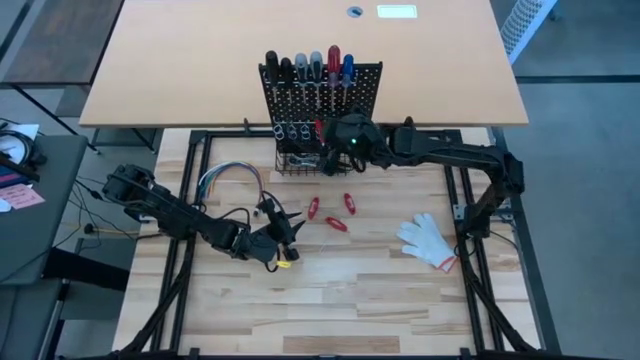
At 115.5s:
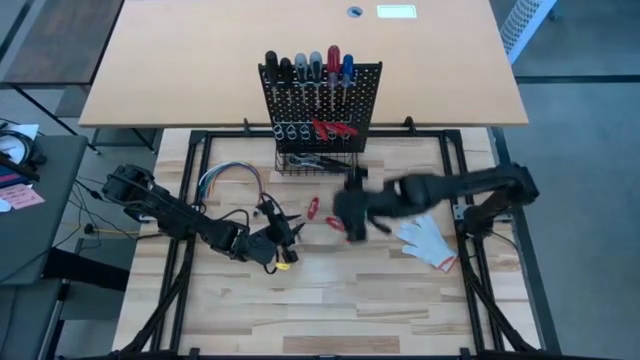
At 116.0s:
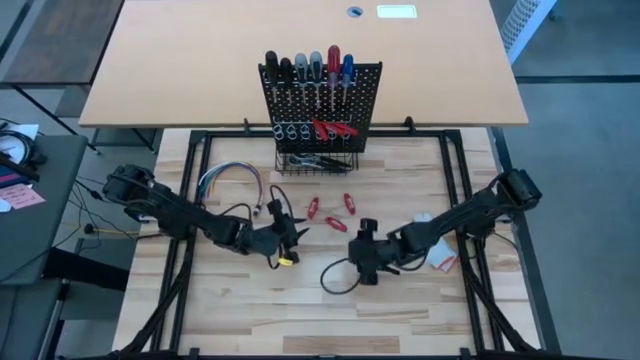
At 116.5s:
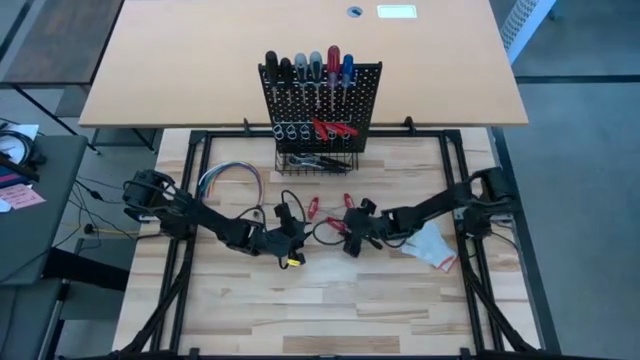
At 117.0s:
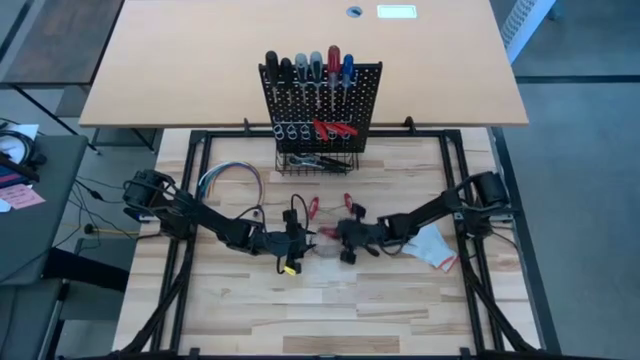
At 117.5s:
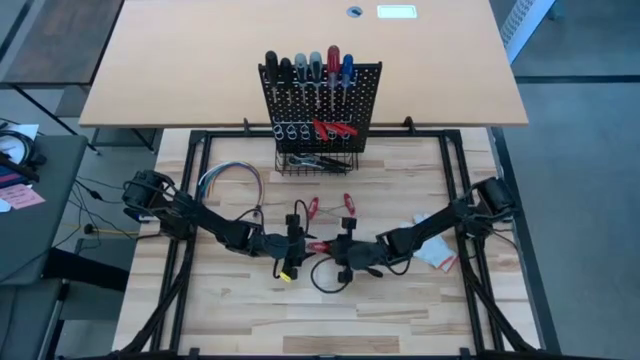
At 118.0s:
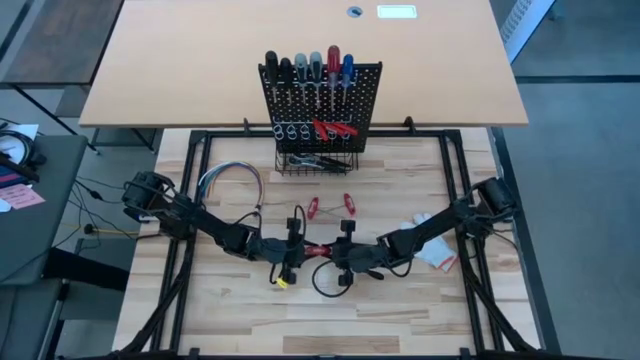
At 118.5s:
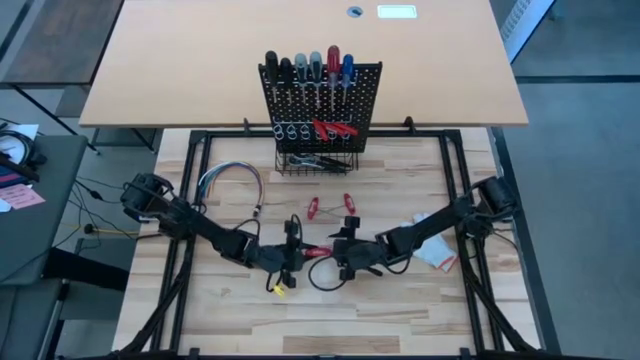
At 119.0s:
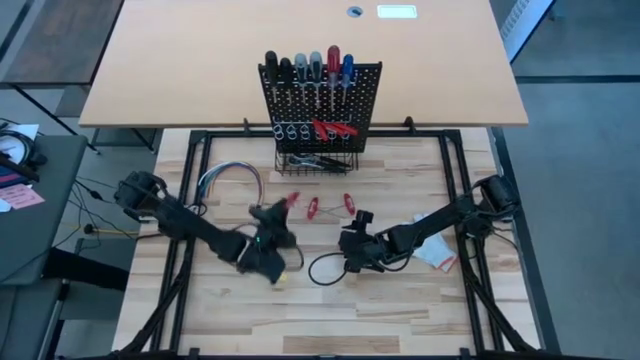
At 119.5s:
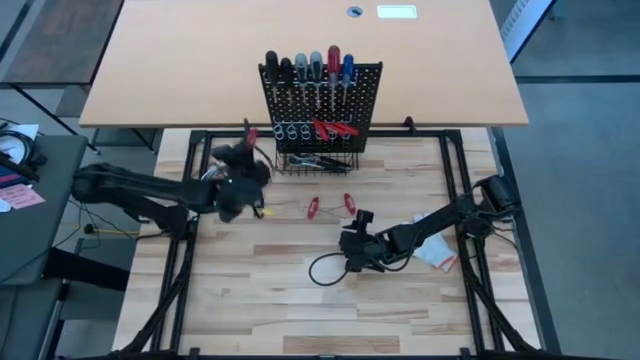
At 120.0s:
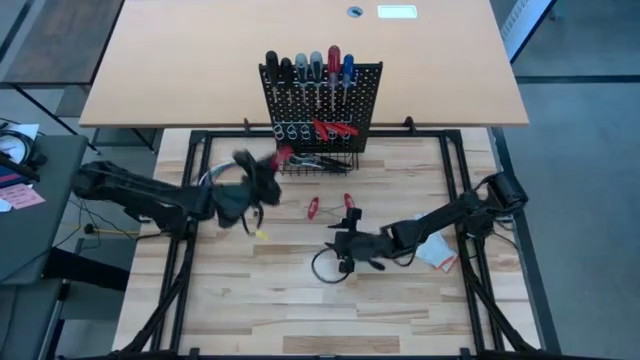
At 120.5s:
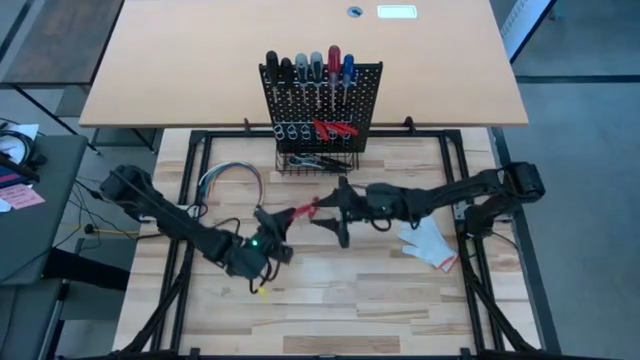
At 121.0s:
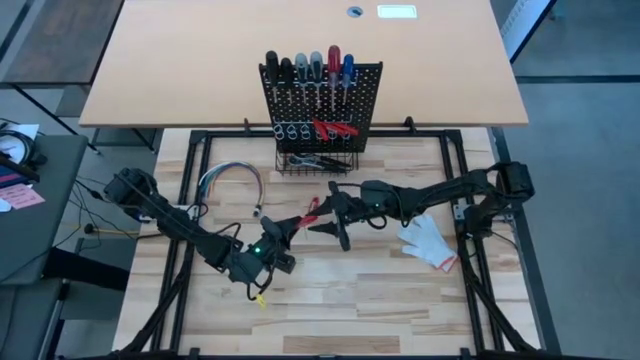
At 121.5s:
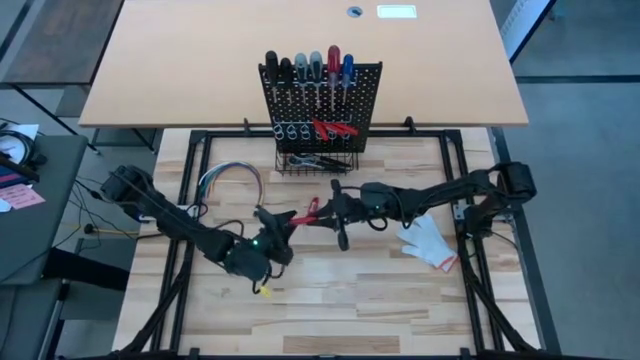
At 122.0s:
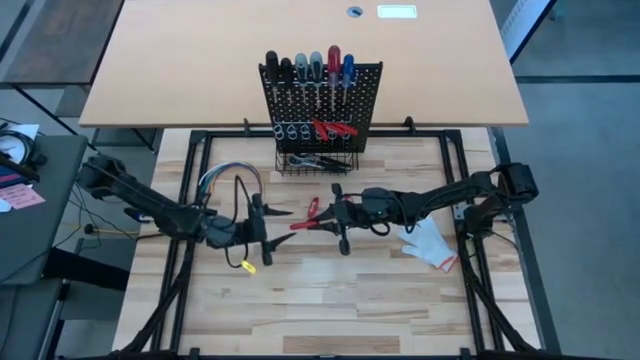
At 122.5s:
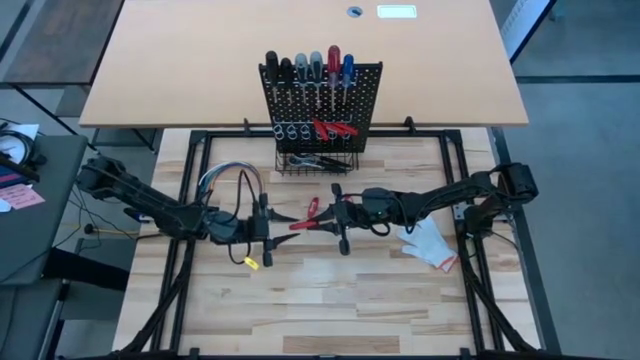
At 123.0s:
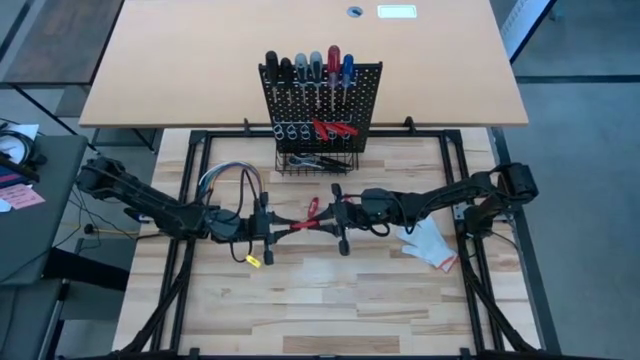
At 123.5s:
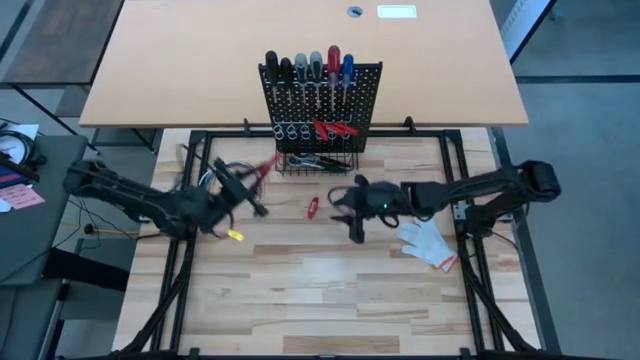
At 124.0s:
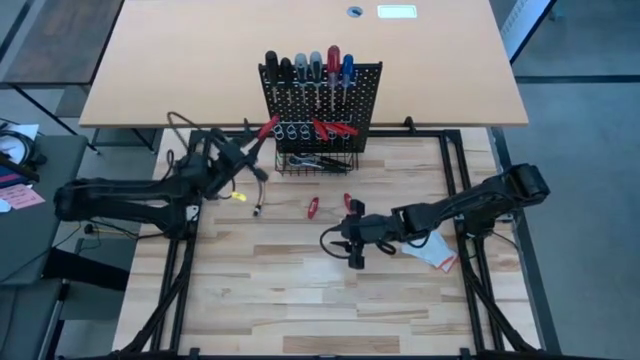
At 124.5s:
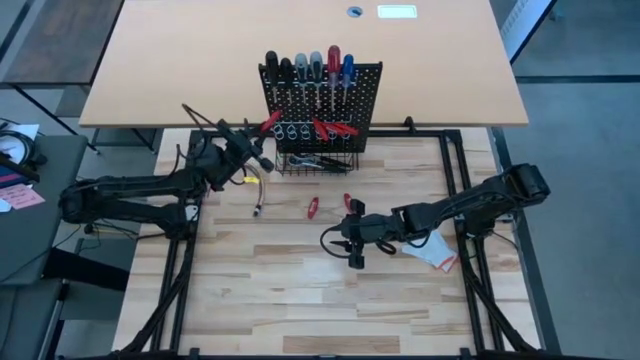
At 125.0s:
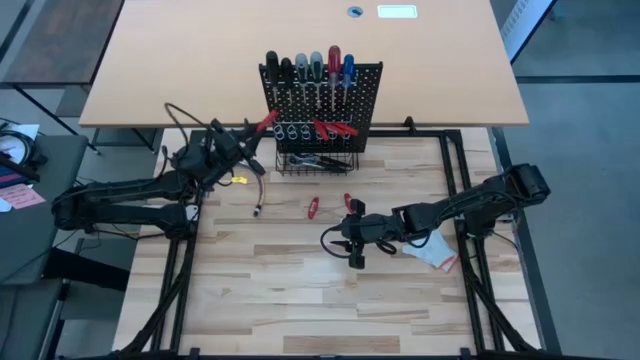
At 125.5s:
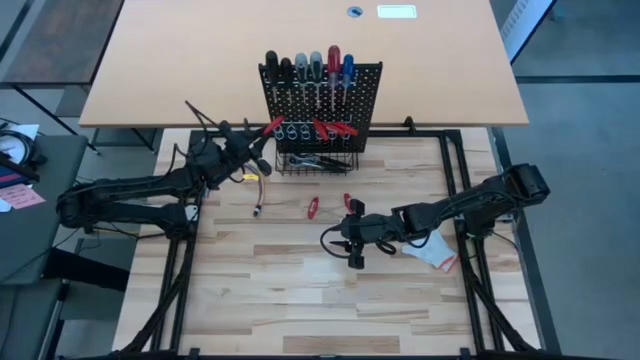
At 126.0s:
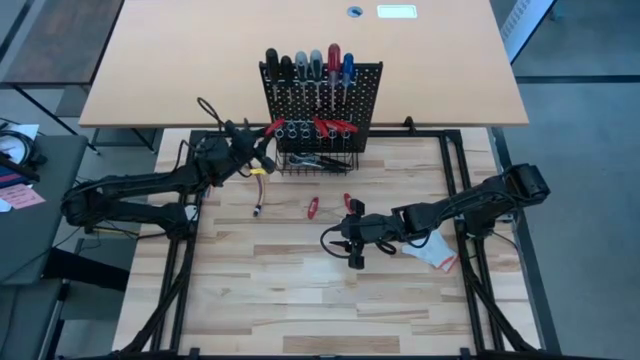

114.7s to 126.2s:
Task: Hang tools onto peg board
Hang the red allen wrench on the pegboard

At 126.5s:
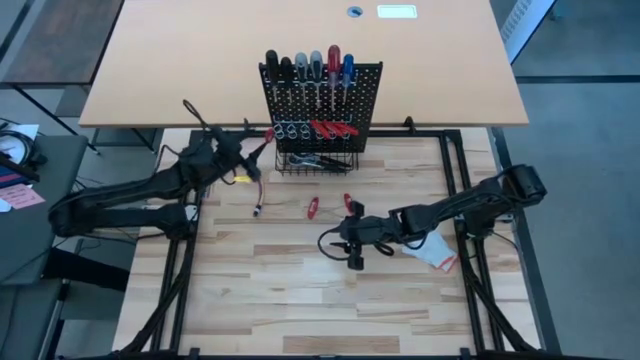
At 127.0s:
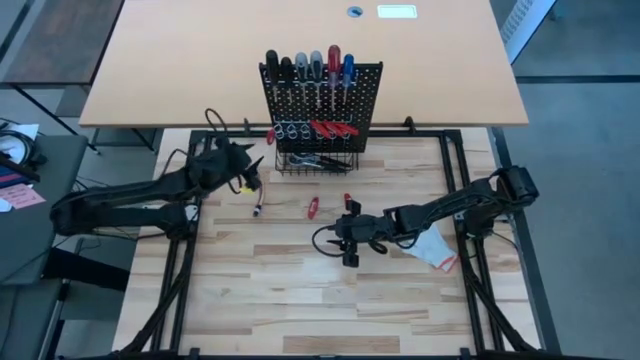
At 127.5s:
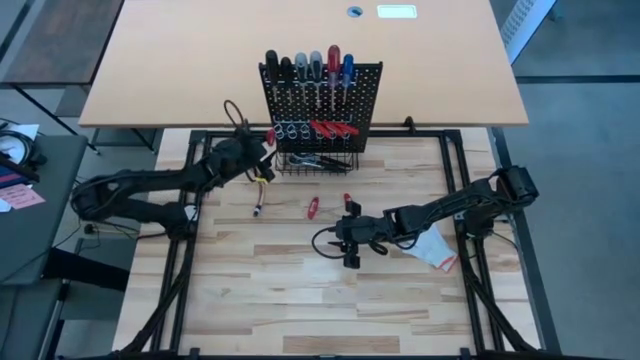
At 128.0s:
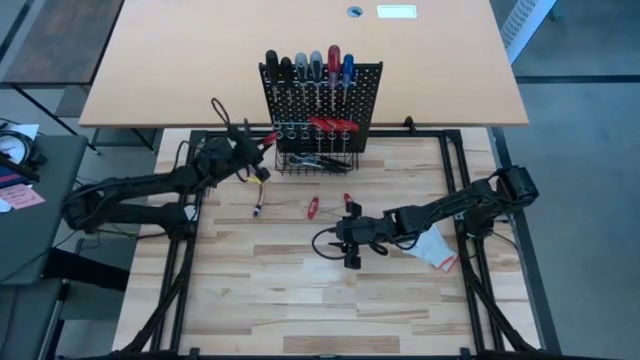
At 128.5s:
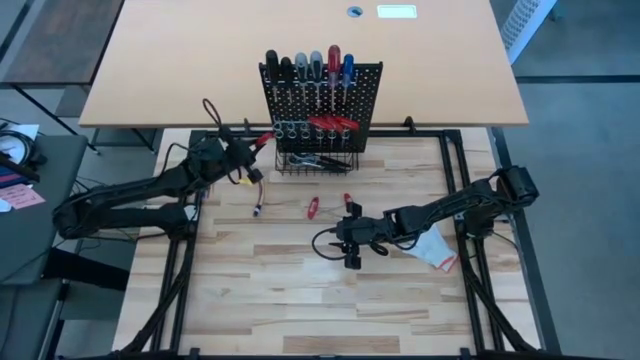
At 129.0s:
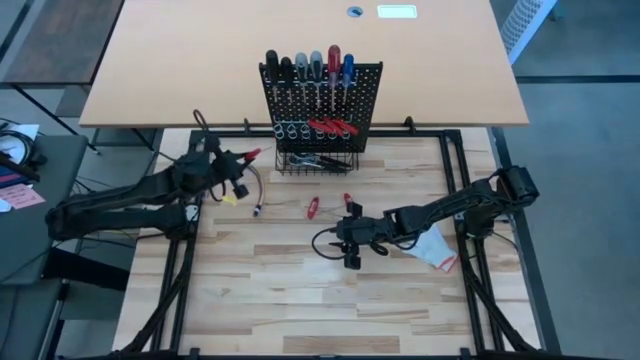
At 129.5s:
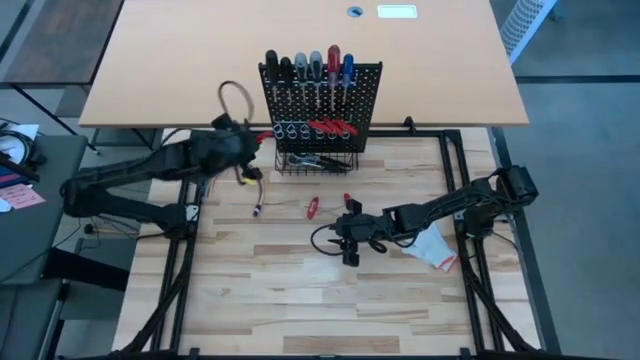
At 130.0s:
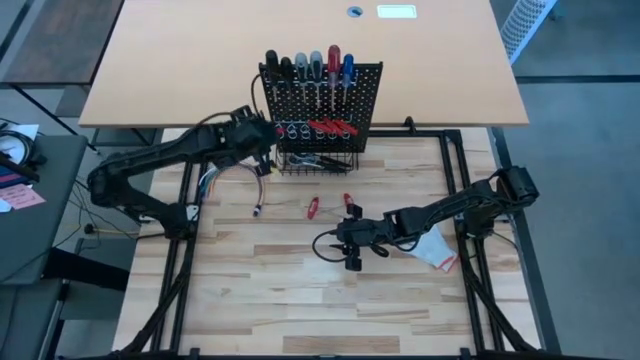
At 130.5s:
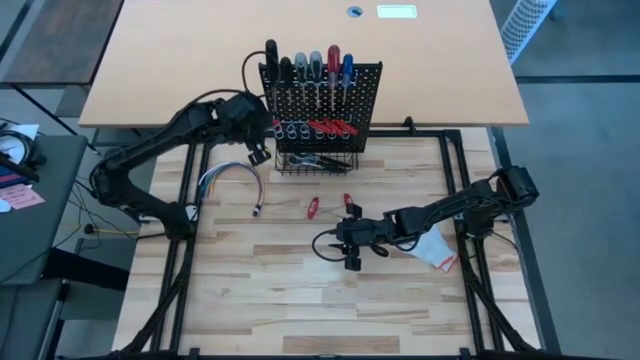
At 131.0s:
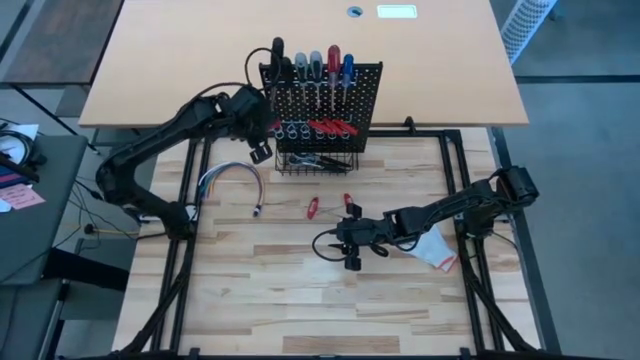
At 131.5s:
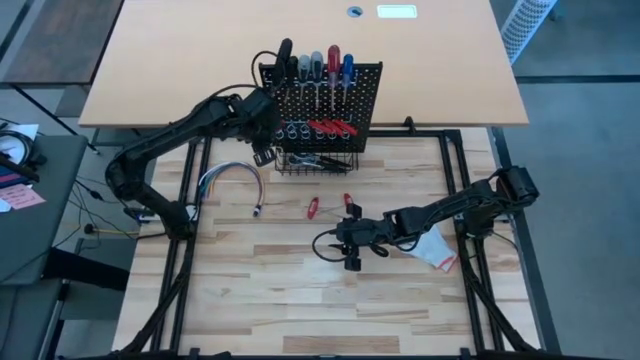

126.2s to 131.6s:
Hang the red allen wrench on the pegboard

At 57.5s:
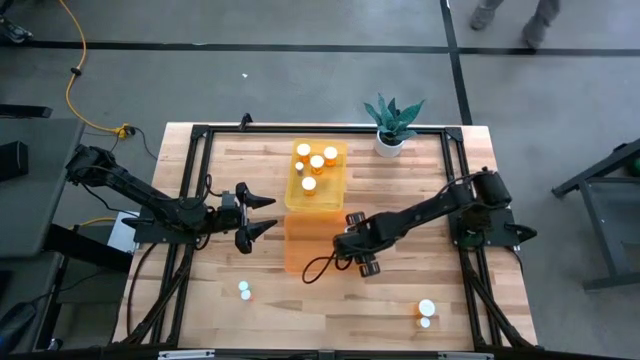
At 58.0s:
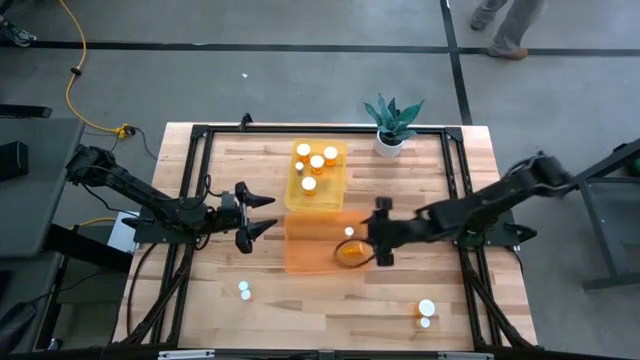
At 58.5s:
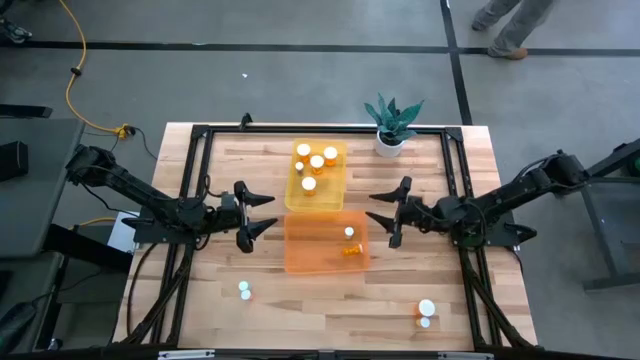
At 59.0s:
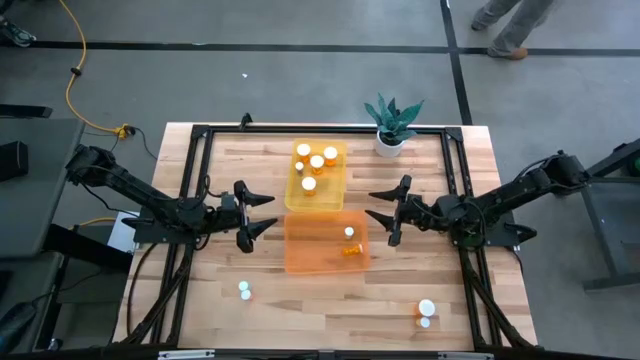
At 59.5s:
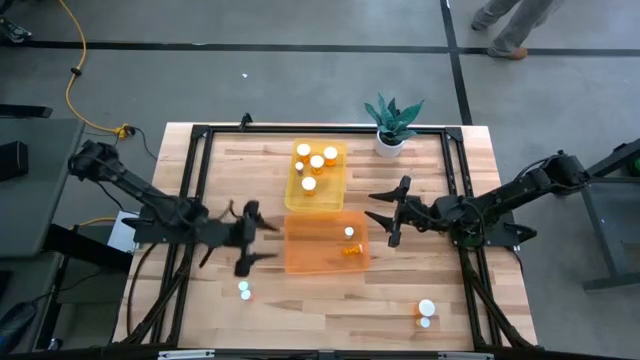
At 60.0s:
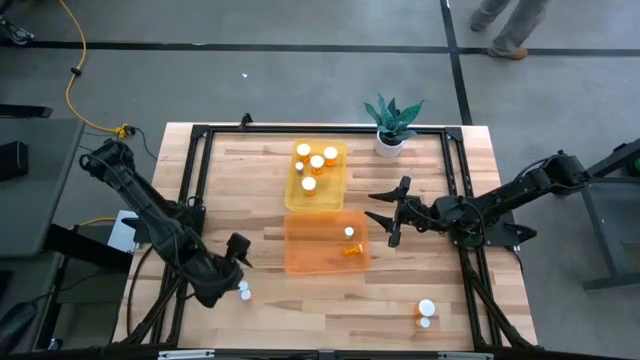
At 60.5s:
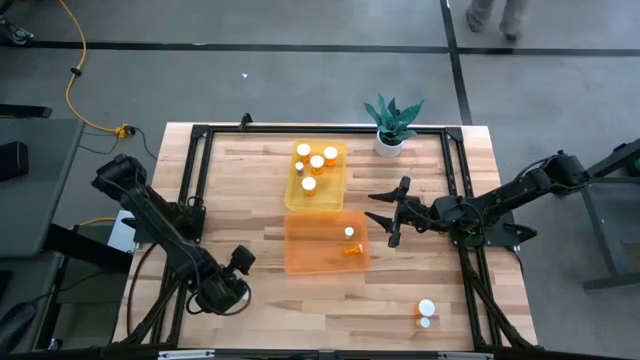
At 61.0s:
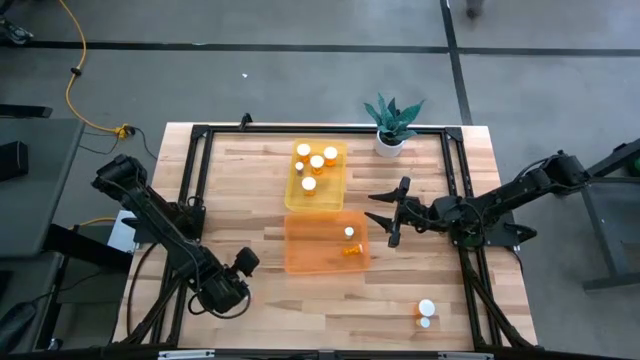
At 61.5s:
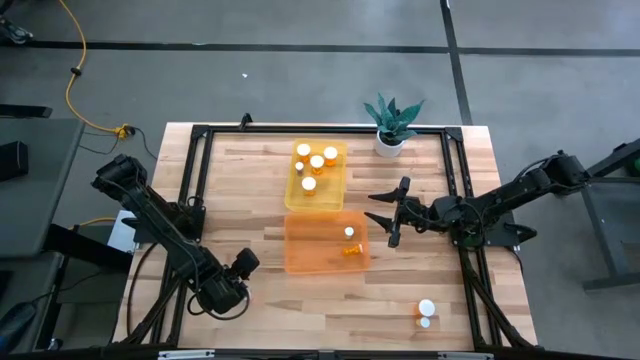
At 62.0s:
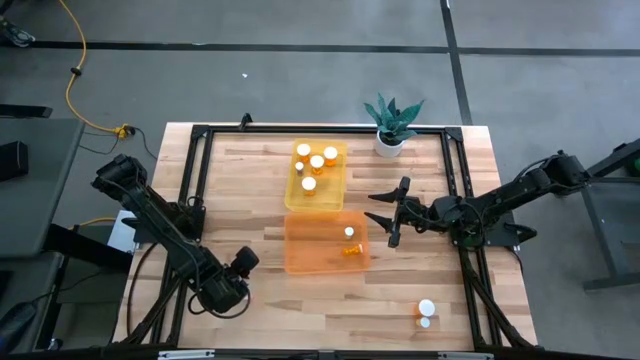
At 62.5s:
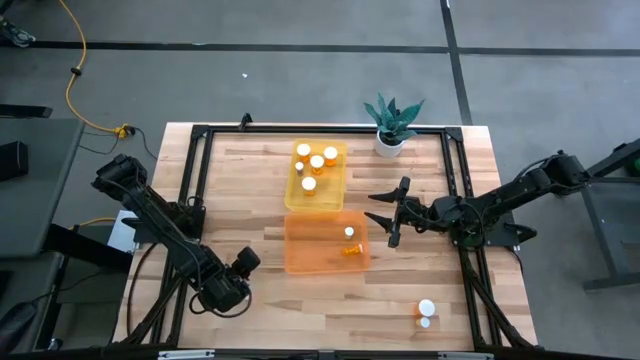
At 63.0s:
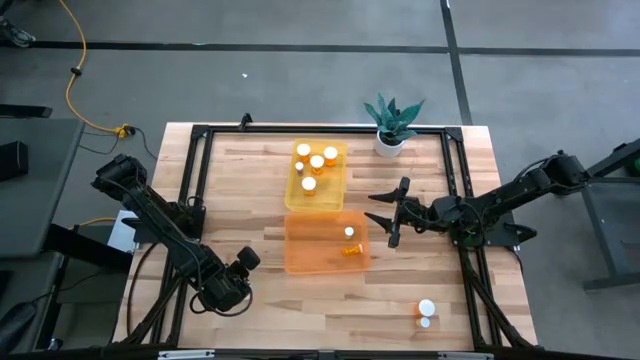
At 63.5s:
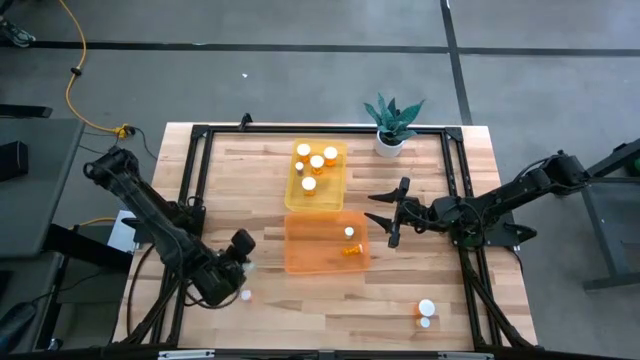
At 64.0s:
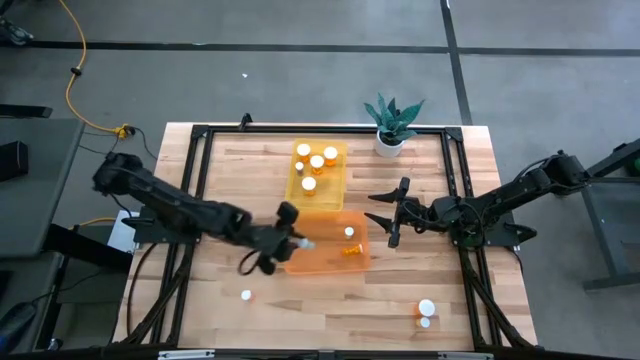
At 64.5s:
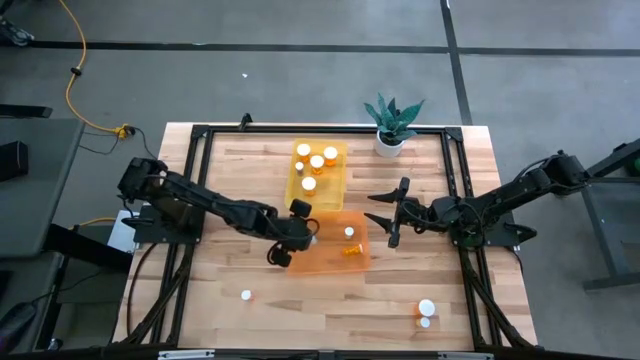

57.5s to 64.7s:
Task: Pick and place medicine bottles into bin by pill shape (circle, oval)
Put the blue tablet bottle into the orange bin
